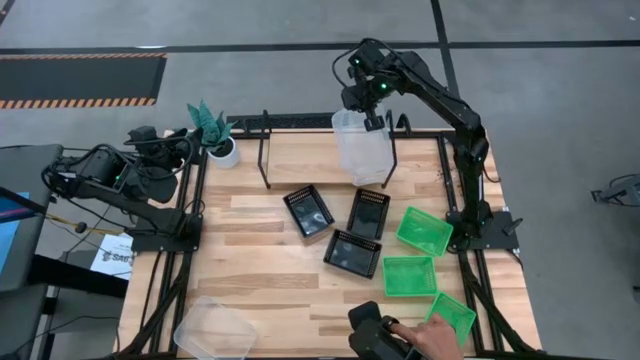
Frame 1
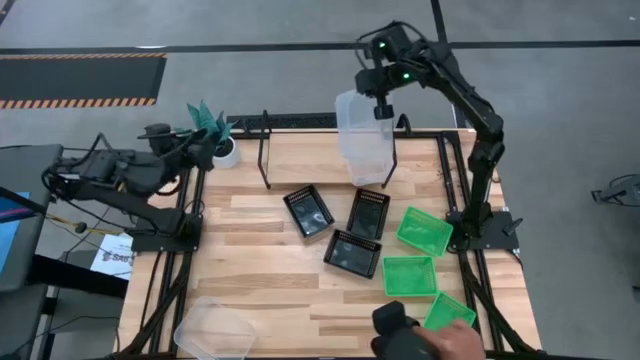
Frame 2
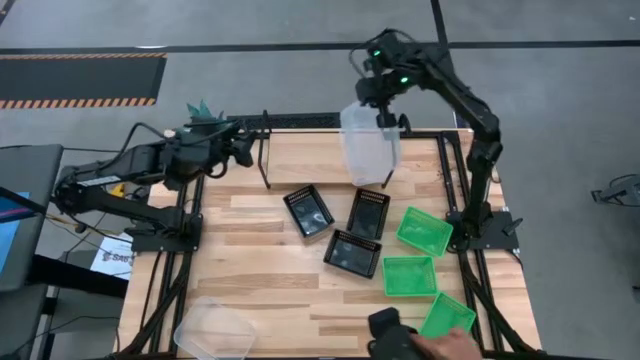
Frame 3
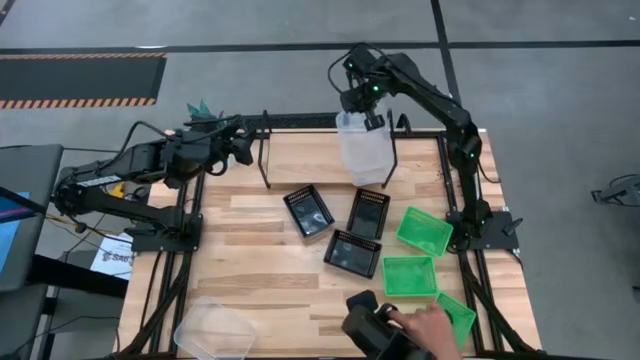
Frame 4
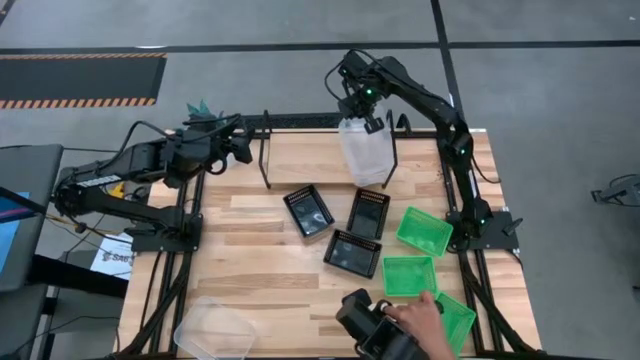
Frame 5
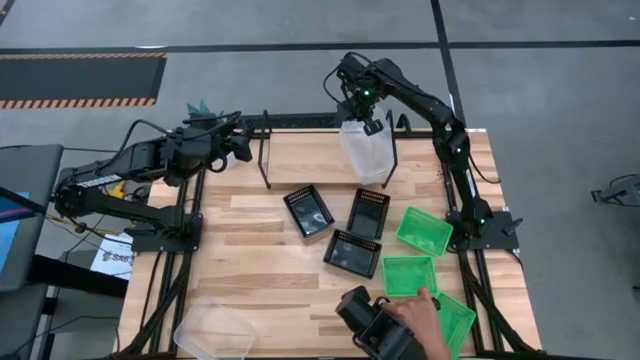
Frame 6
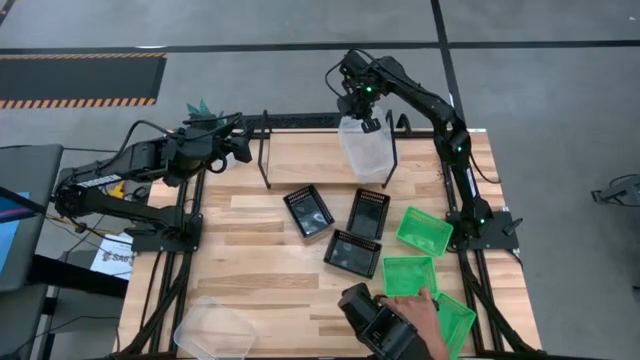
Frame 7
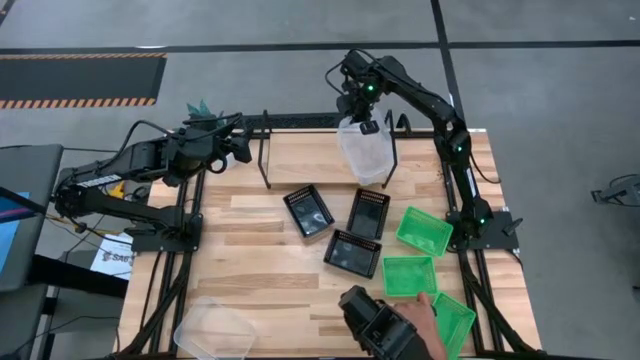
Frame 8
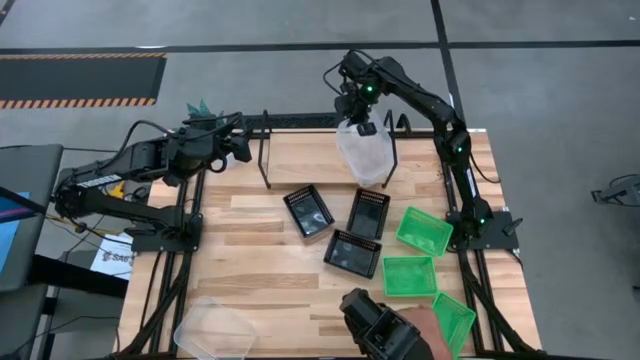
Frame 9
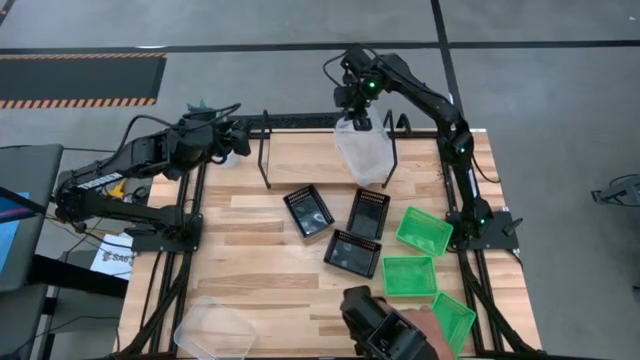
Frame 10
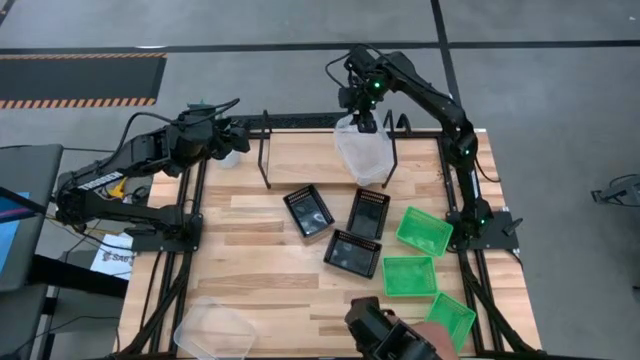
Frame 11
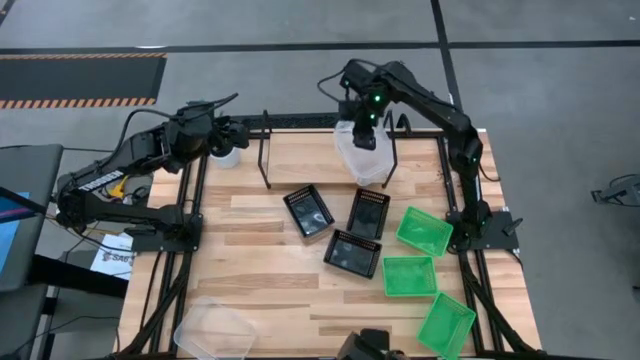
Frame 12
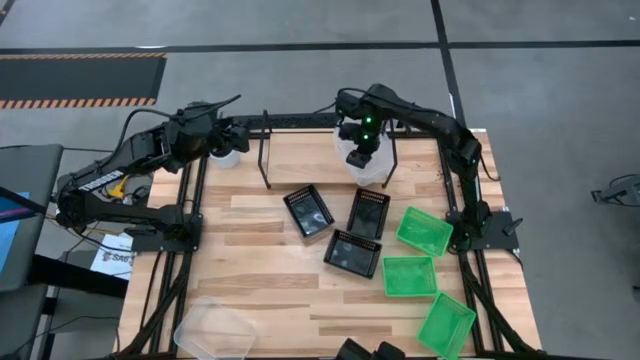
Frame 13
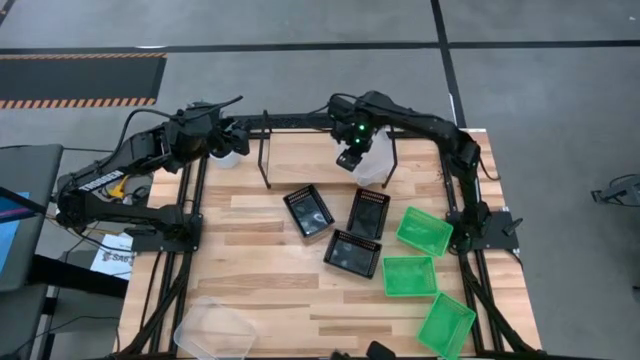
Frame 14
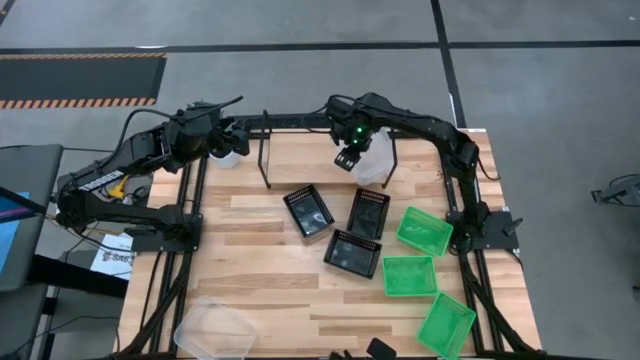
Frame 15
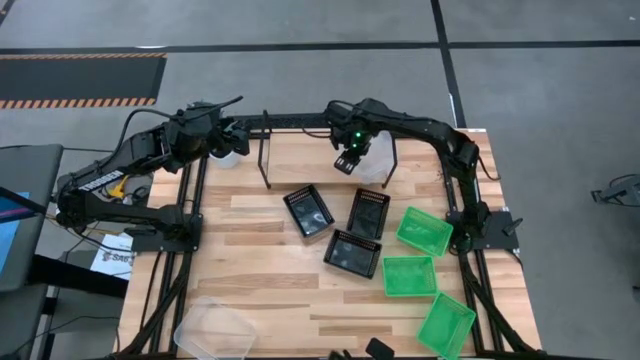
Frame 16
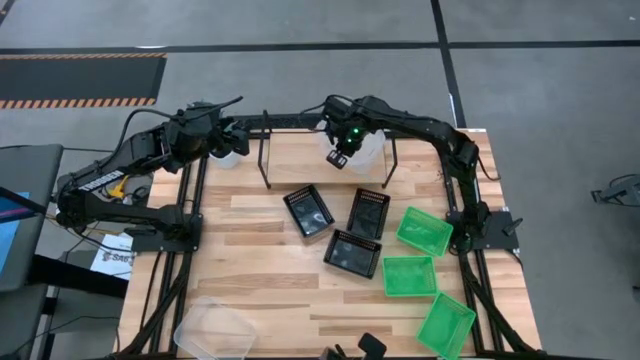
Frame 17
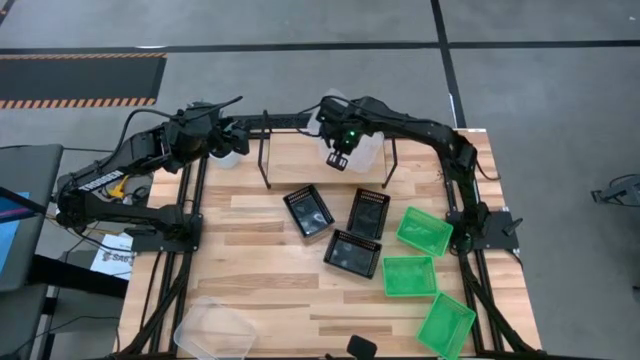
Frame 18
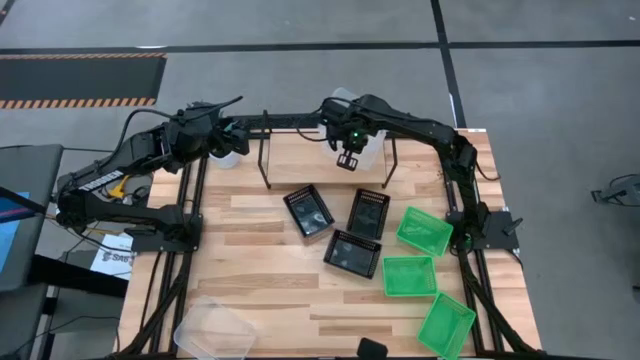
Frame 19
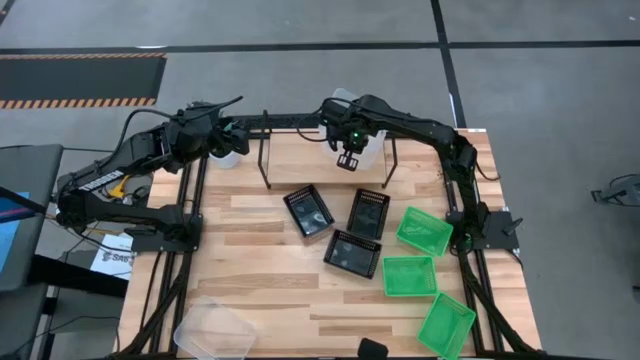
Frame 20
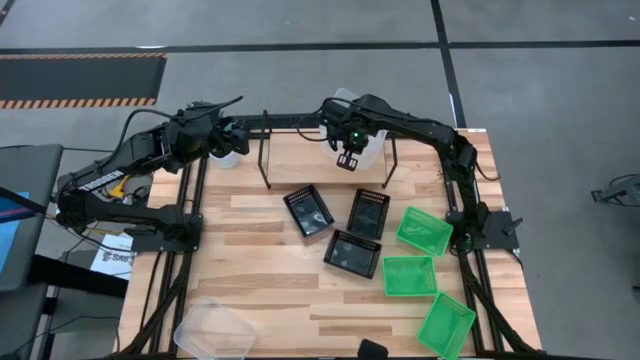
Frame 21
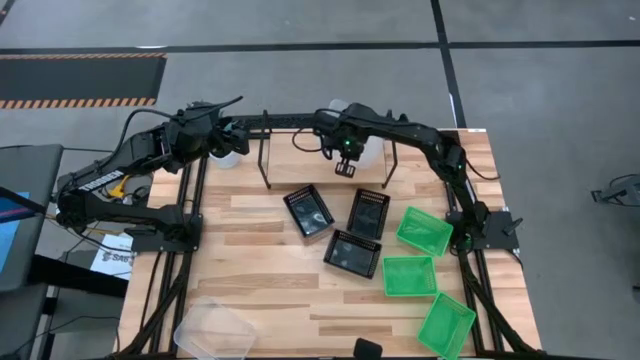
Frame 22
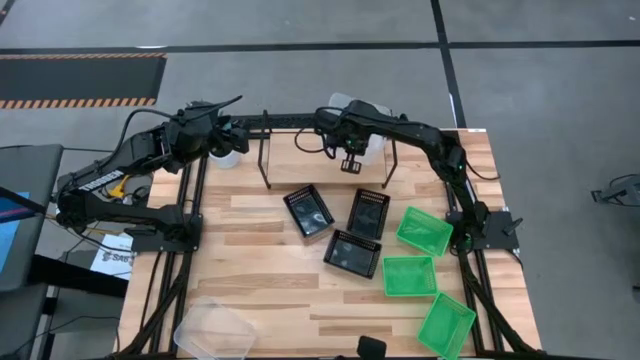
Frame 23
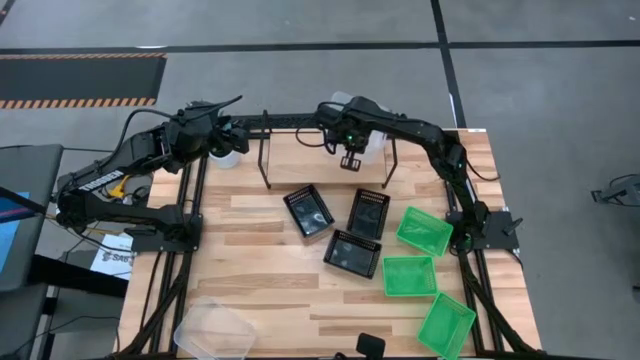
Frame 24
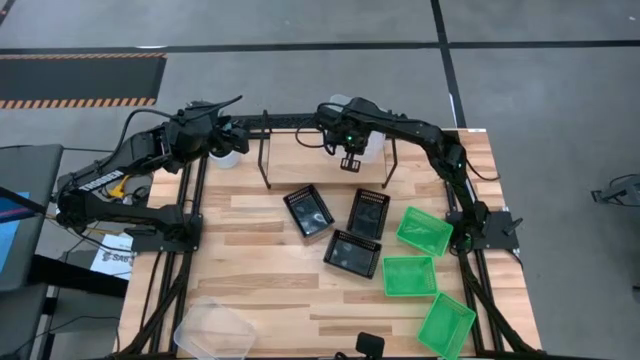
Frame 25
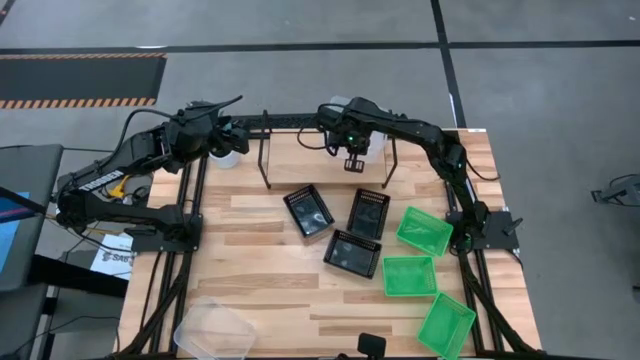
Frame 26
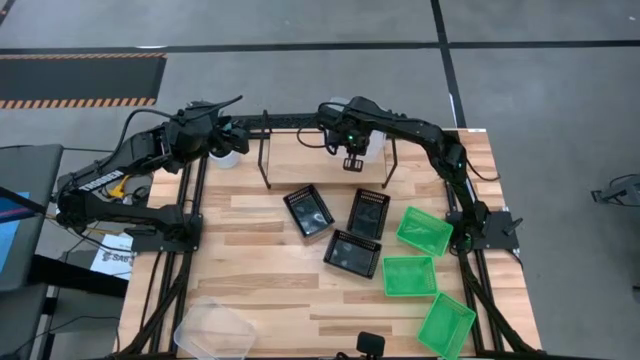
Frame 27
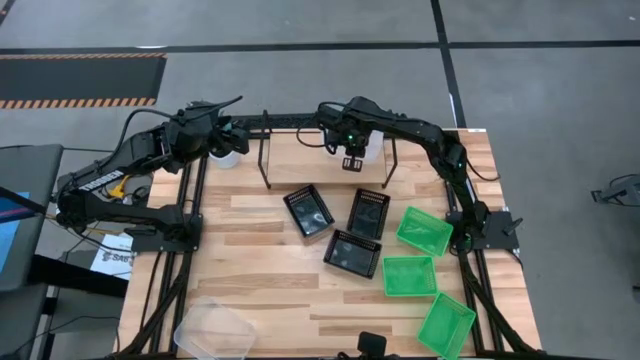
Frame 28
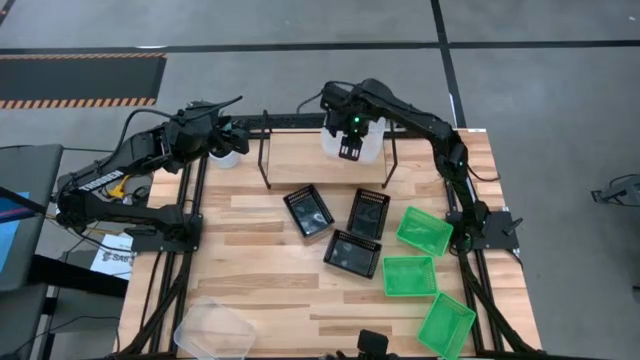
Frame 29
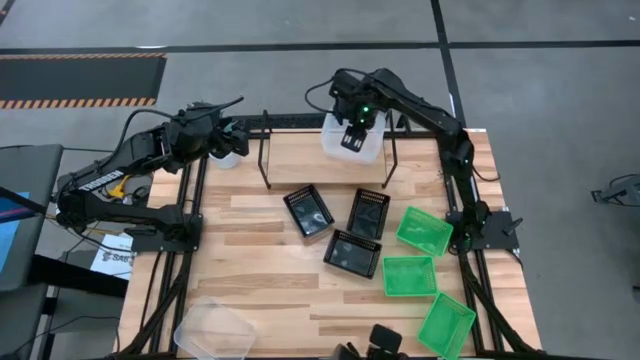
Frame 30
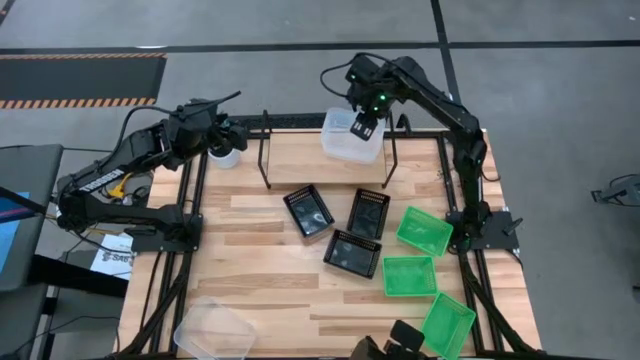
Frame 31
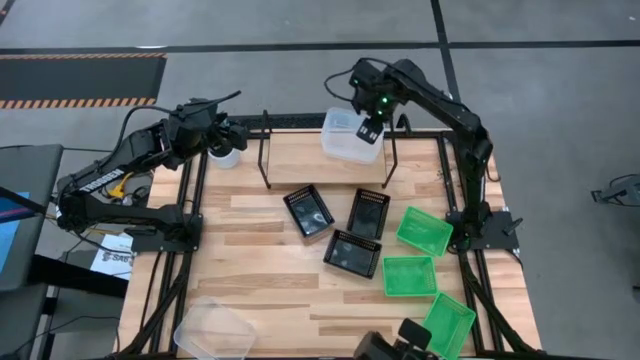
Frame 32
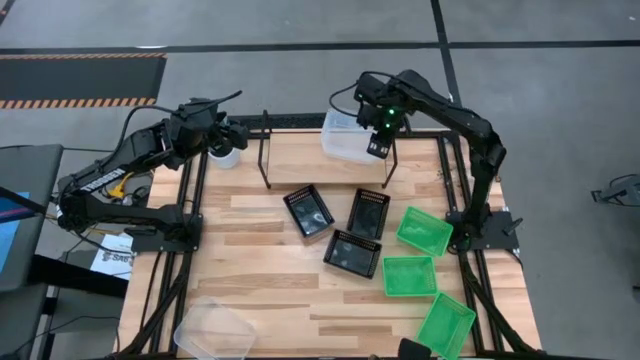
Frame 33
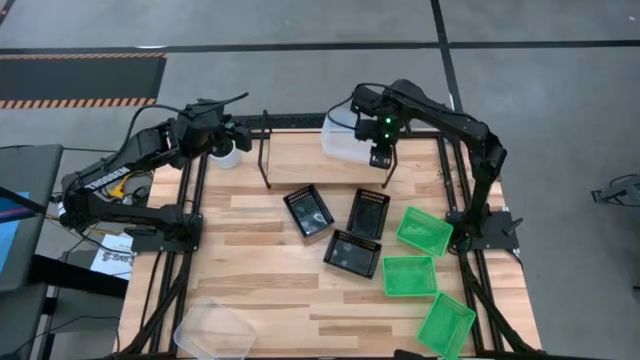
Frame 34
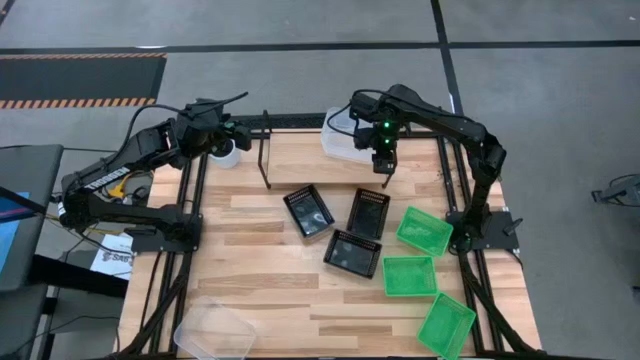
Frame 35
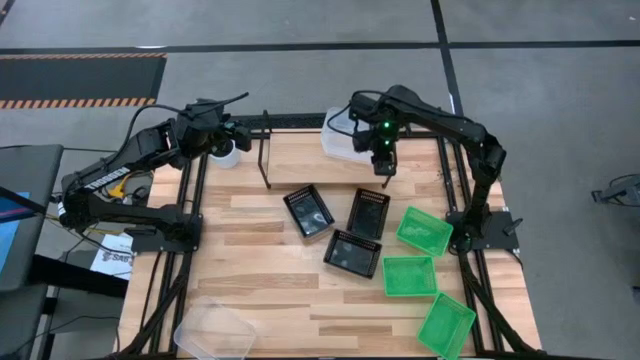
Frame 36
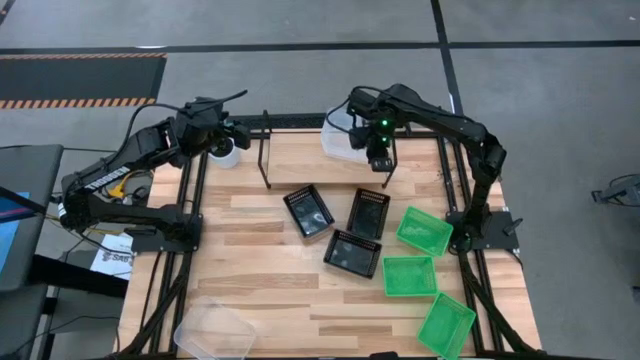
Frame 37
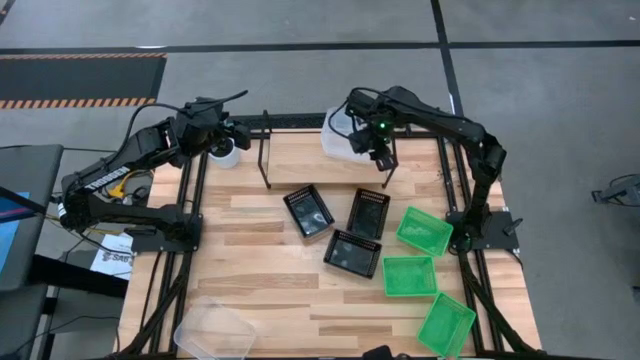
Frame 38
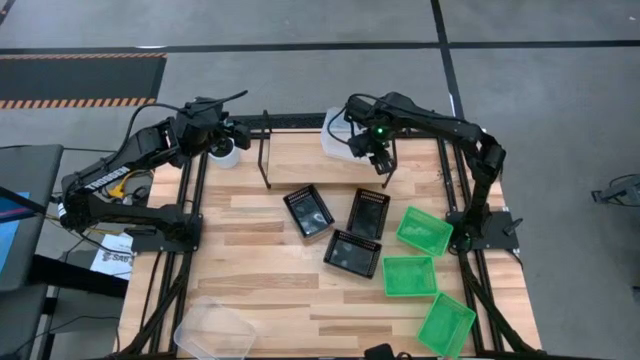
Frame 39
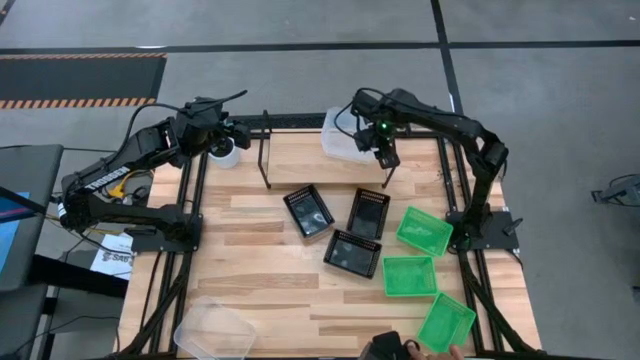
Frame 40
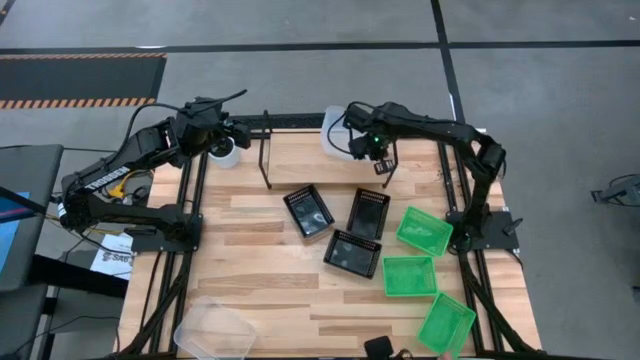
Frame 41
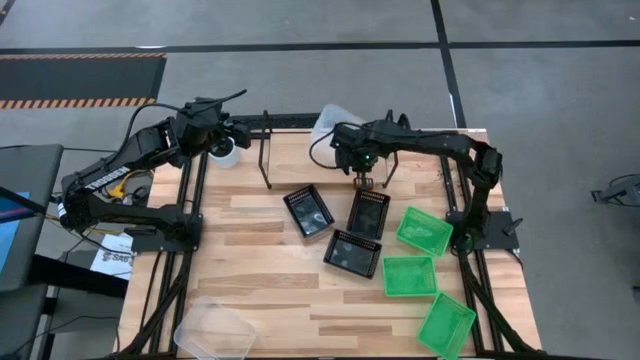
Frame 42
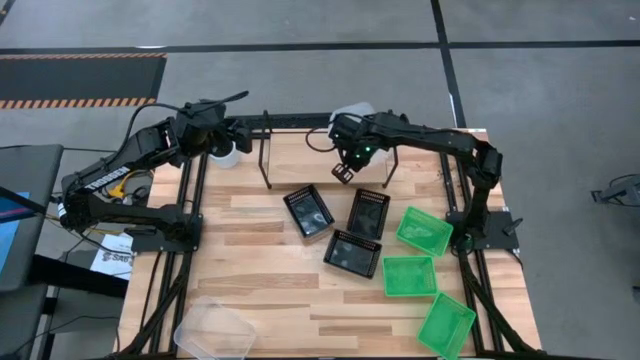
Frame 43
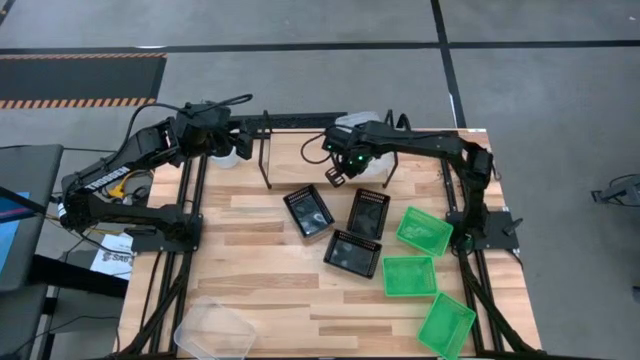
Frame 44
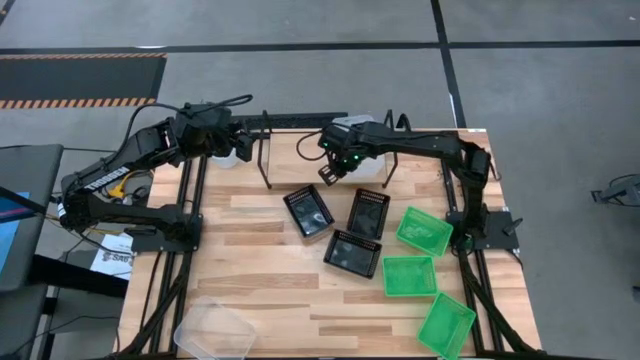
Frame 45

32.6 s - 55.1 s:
Task: Stack baskets on shelf by color
Stack the right transparent bin on top of the transparent bin on the shelf
